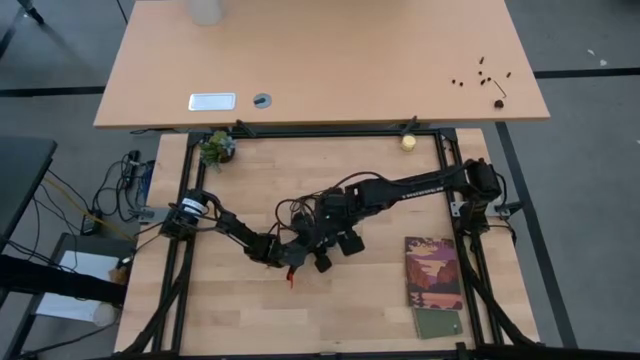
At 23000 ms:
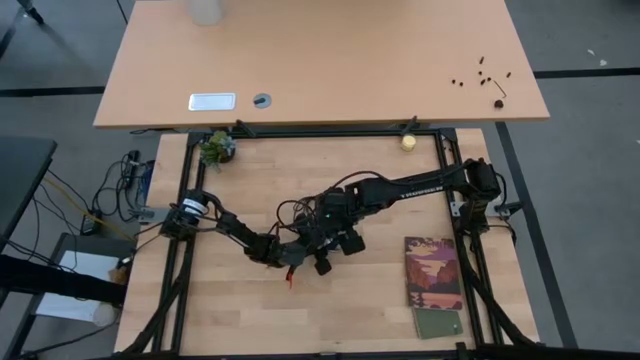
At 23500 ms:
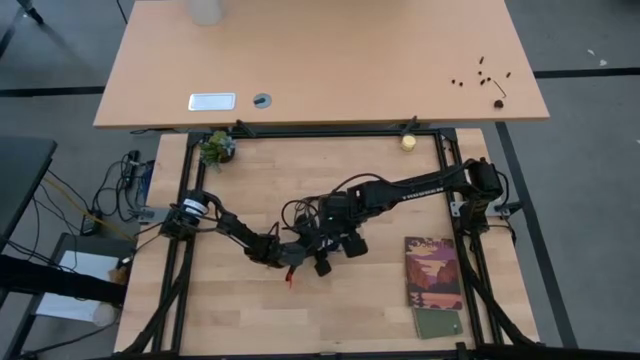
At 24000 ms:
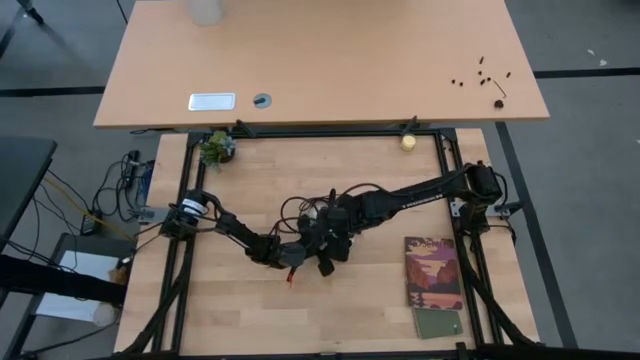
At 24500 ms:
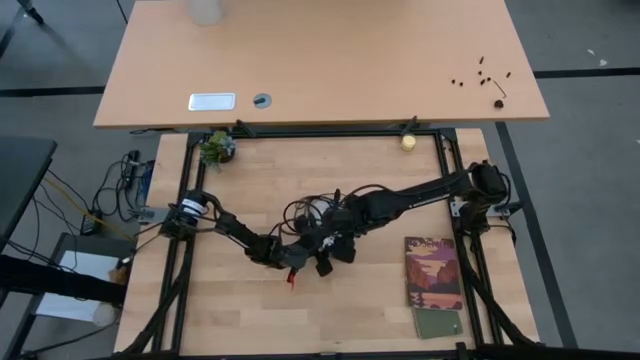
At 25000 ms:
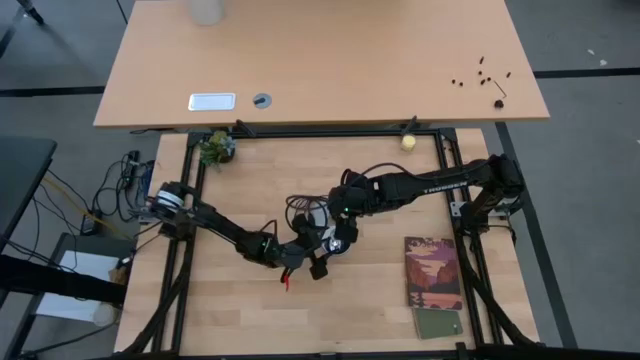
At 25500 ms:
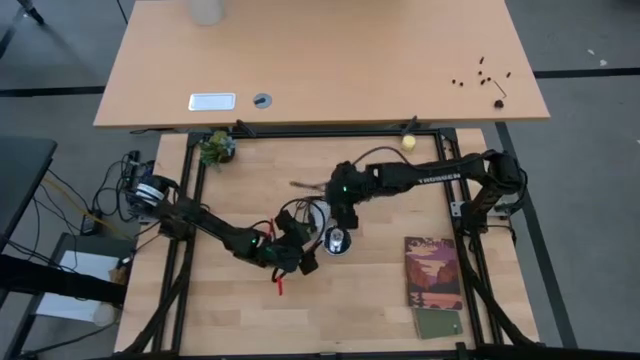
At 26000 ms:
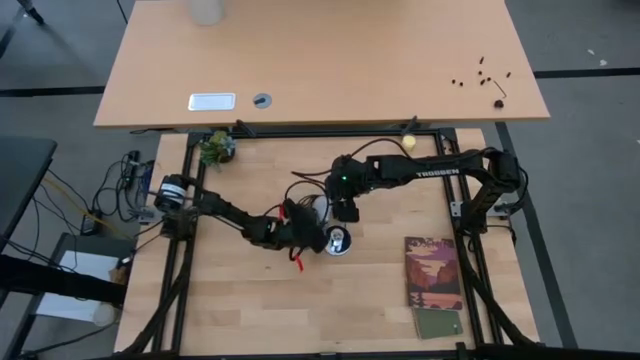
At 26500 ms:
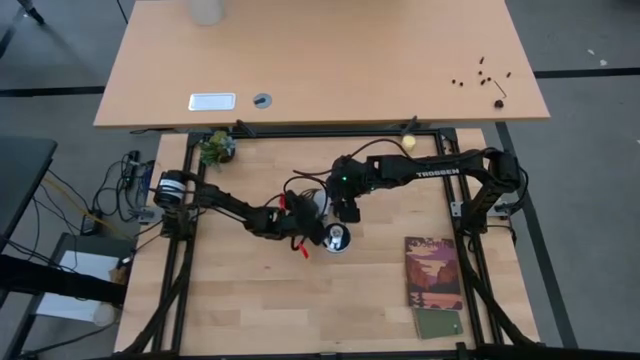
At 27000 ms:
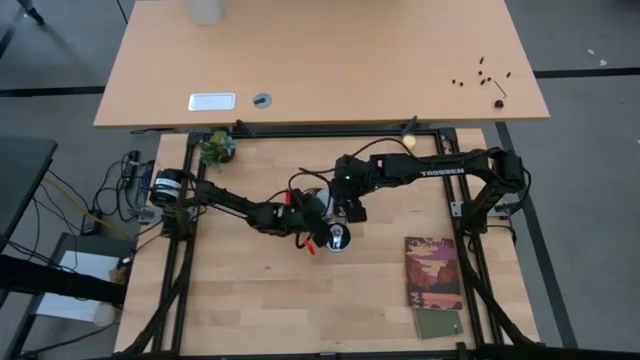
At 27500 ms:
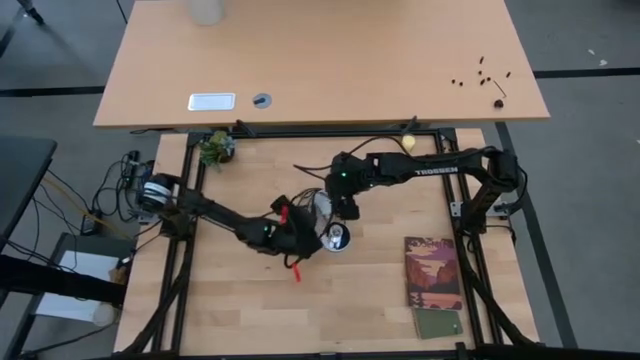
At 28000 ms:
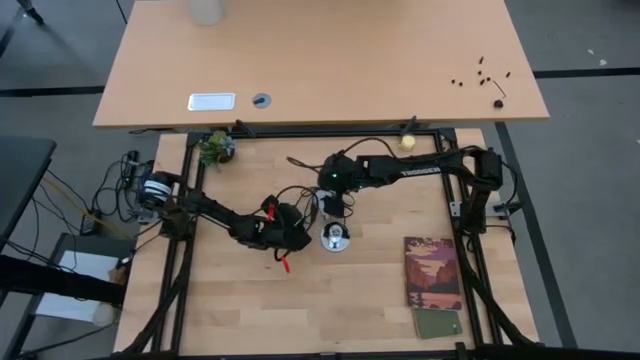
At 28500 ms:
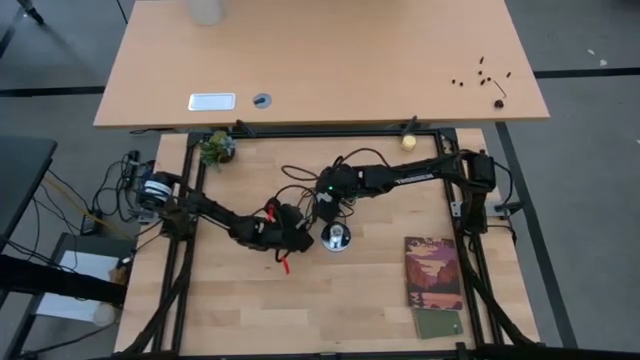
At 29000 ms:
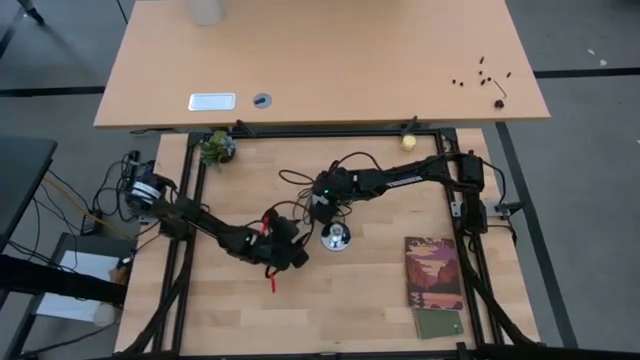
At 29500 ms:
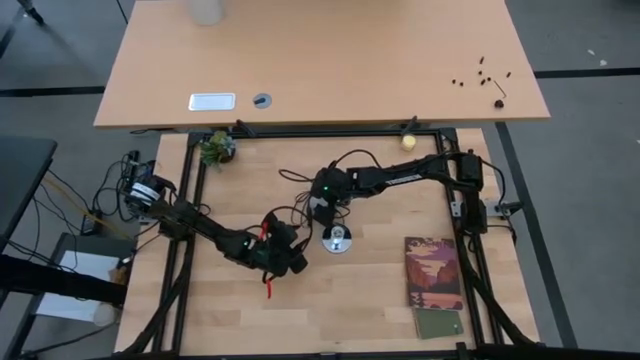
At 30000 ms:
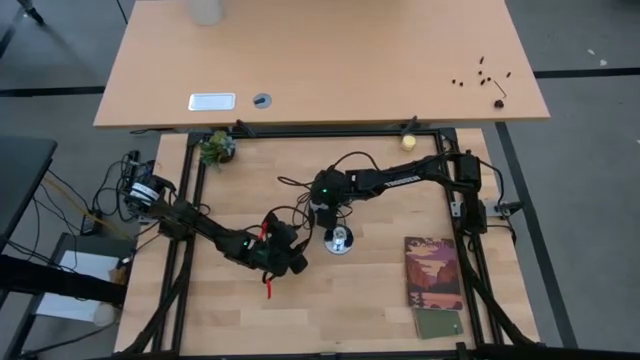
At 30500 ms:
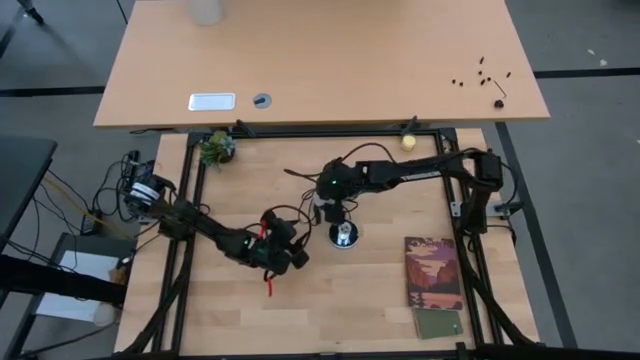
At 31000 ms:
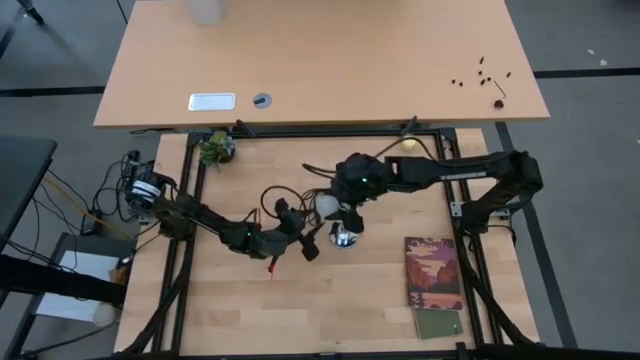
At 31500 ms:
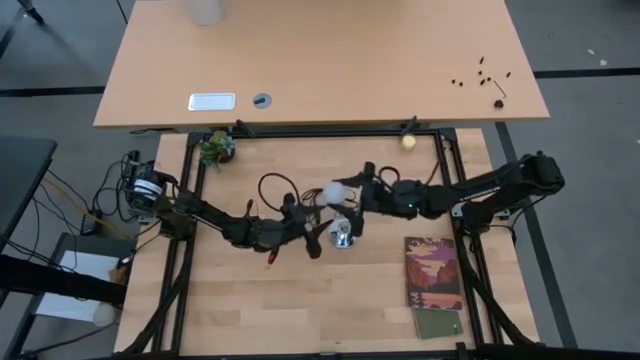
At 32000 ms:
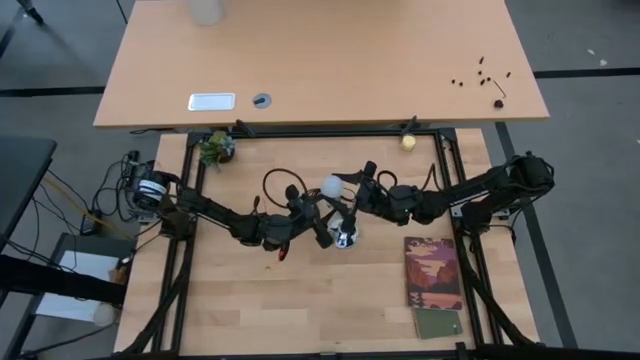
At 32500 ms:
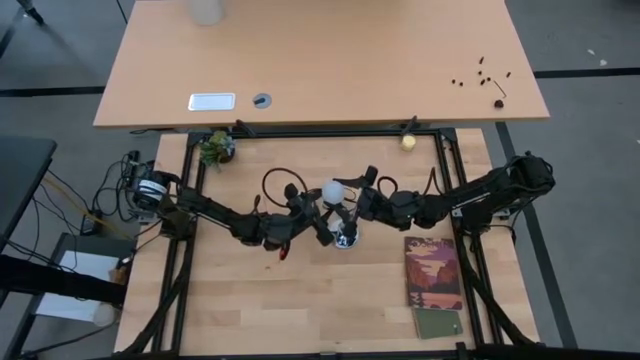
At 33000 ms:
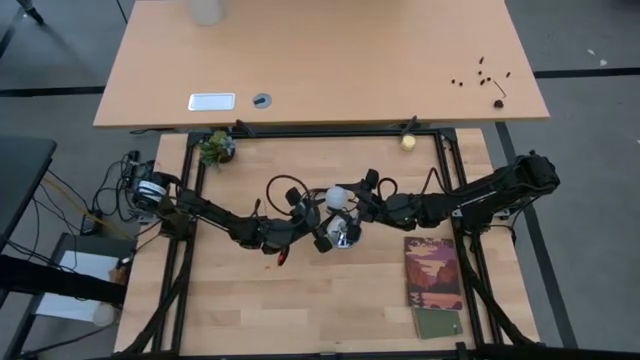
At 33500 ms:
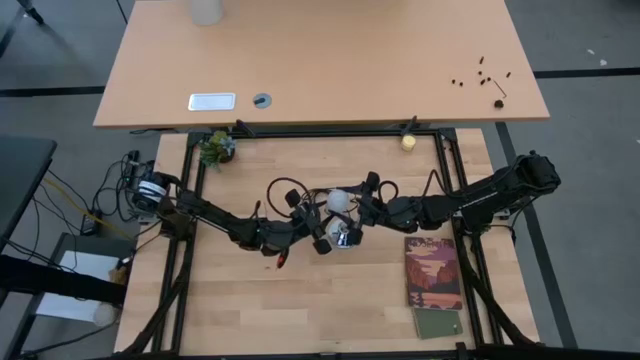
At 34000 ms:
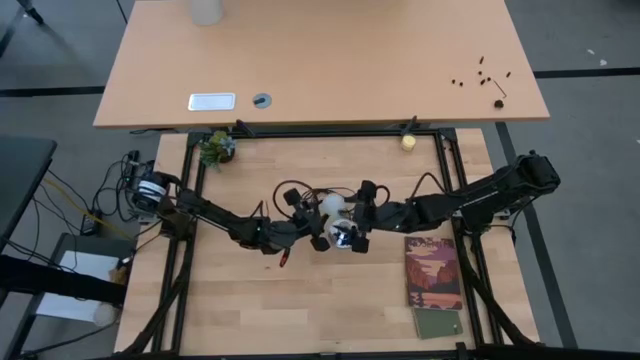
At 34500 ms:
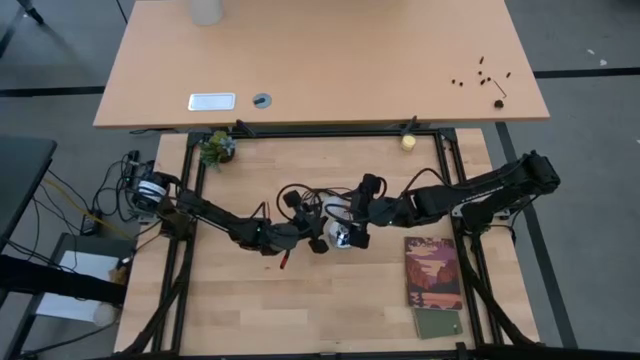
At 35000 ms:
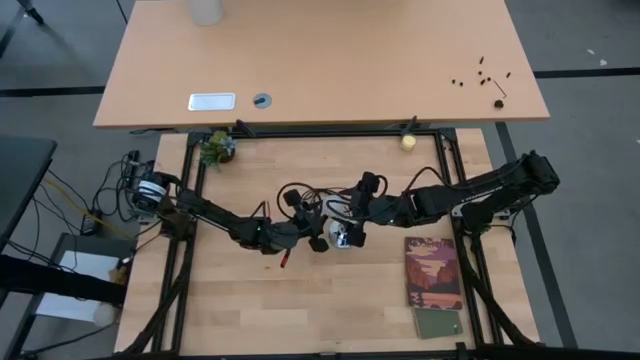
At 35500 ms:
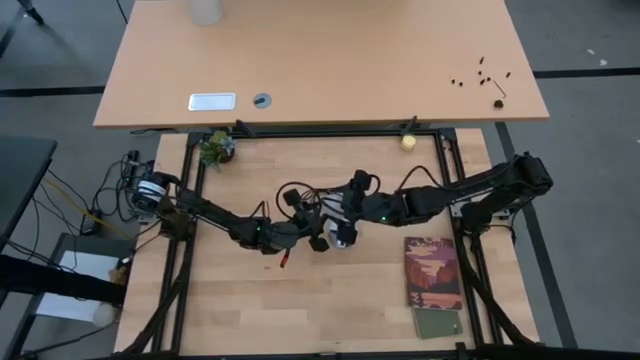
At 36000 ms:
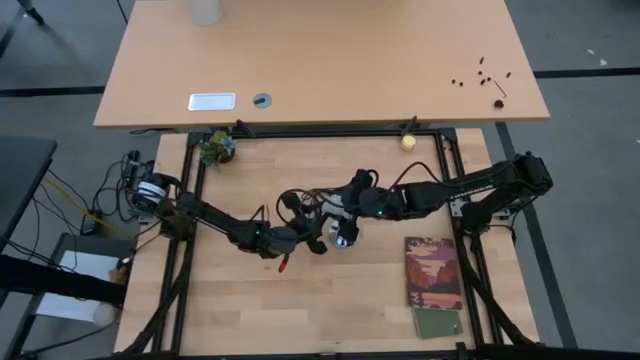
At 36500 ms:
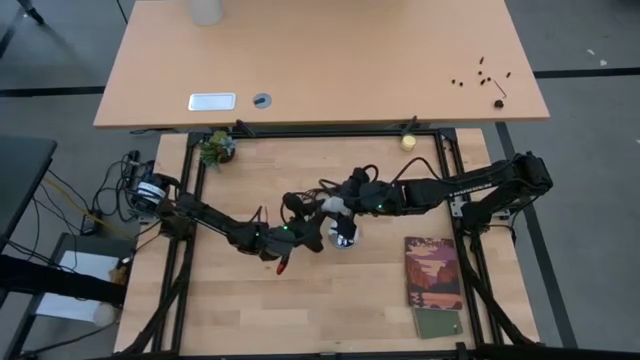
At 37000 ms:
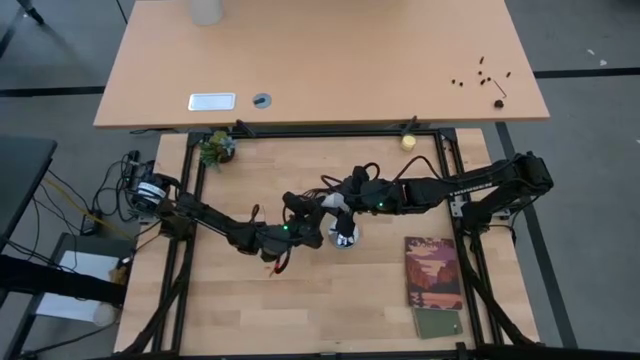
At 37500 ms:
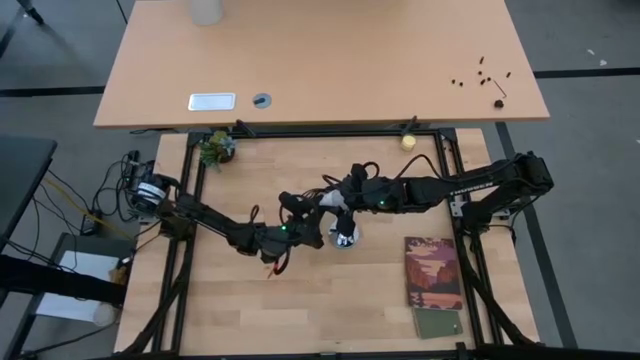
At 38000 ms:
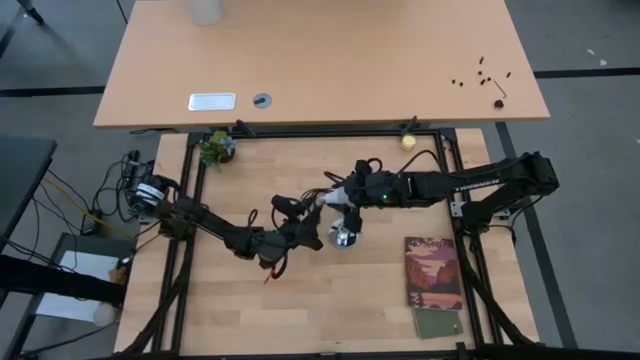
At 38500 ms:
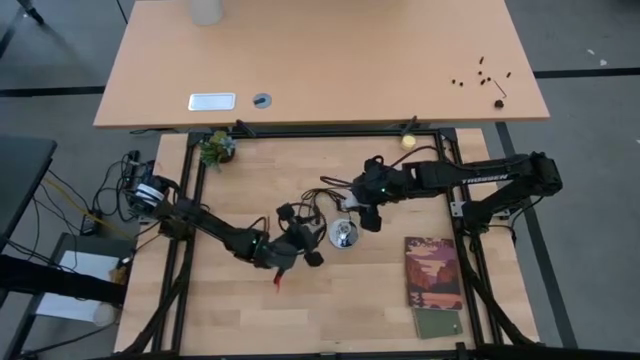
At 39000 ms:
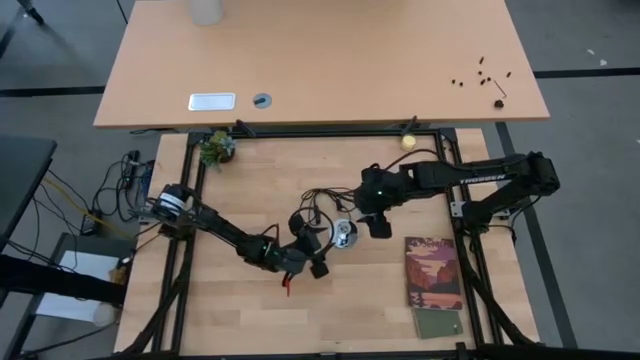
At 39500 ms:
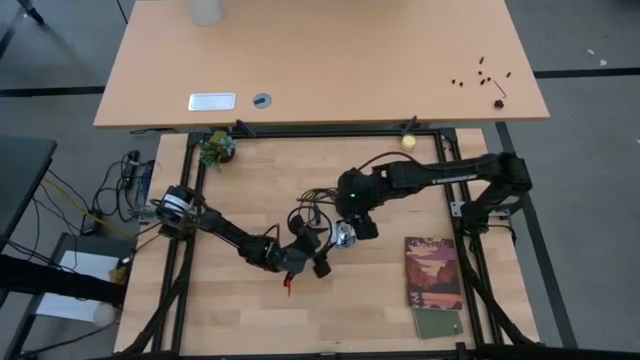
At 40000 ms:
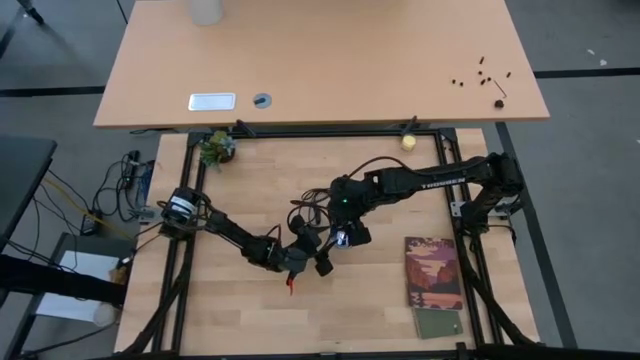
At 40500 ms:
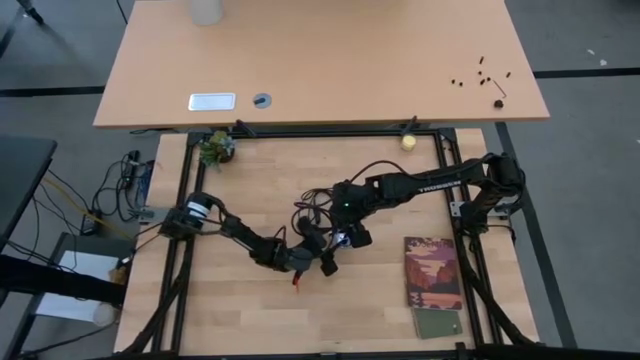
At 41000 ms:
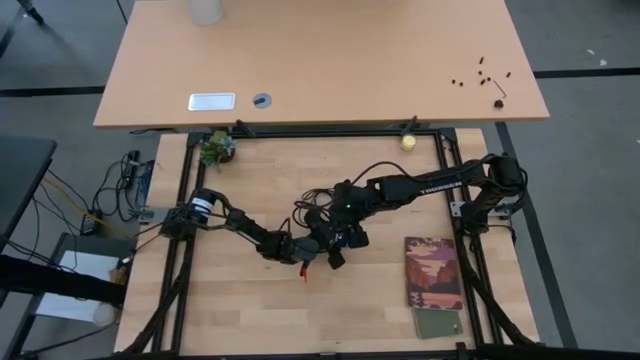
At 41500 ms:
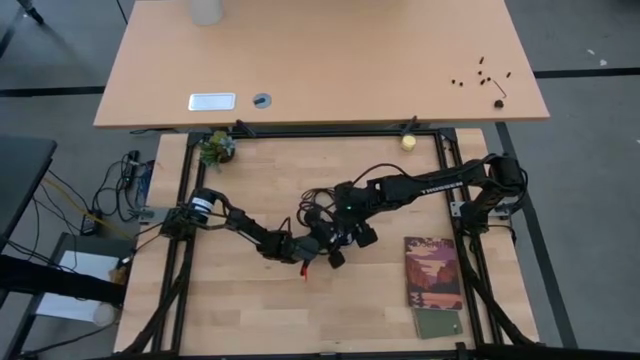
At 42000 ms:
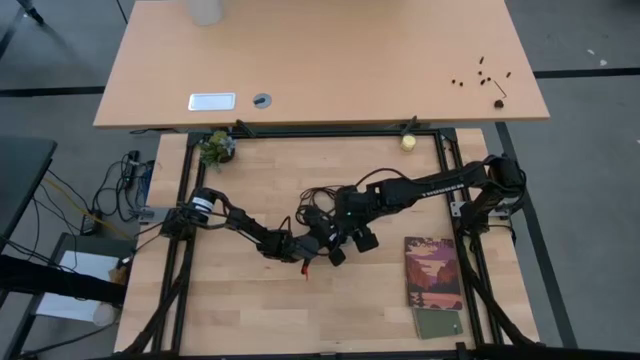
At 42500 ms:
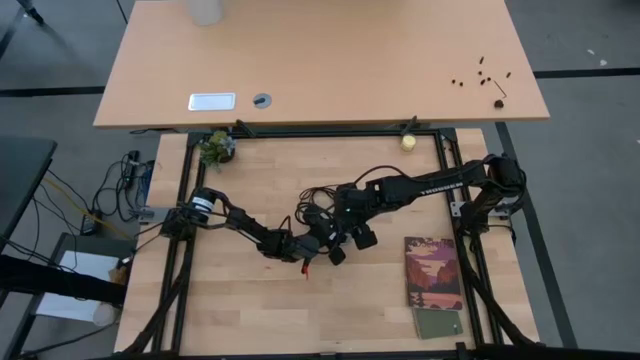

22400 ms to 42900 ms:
Task: Screw lightbulb
Insert the white lightbulb into the silver lamp
